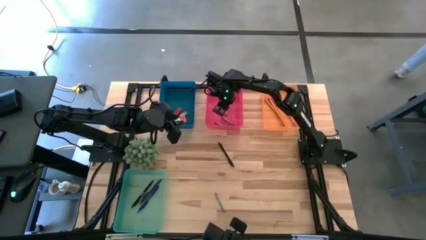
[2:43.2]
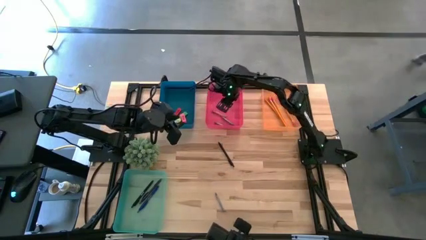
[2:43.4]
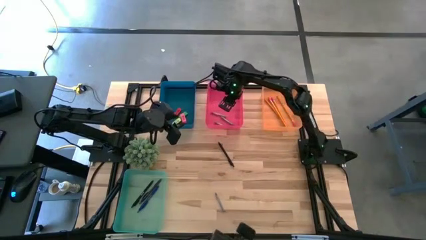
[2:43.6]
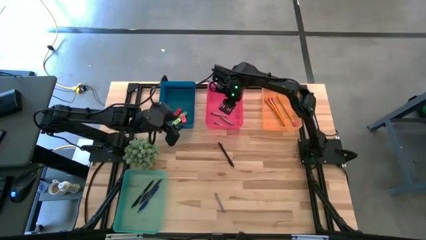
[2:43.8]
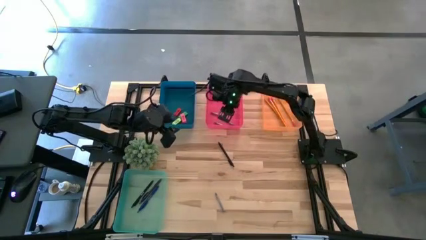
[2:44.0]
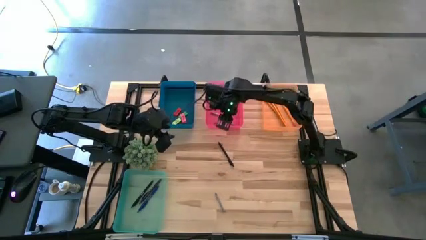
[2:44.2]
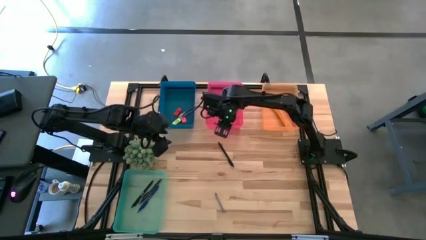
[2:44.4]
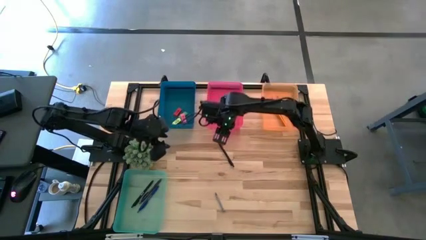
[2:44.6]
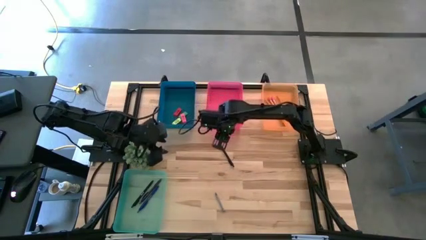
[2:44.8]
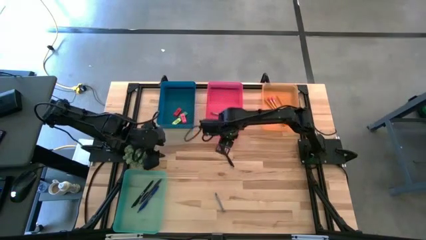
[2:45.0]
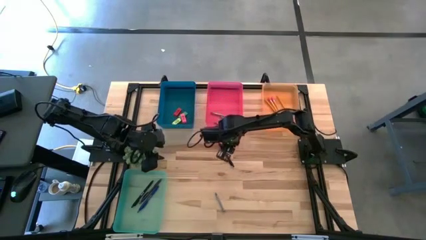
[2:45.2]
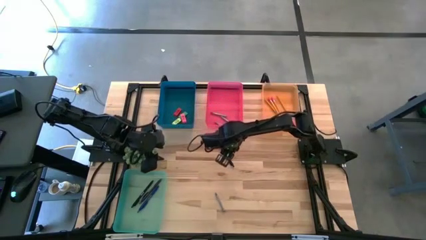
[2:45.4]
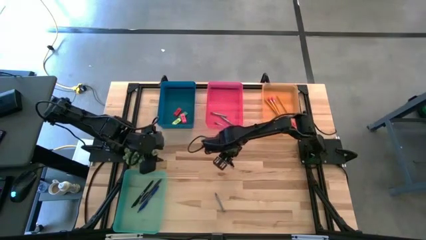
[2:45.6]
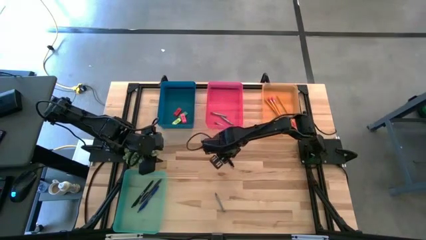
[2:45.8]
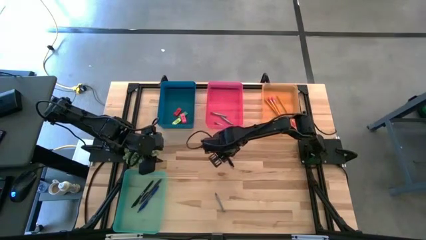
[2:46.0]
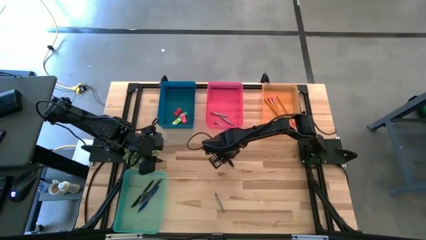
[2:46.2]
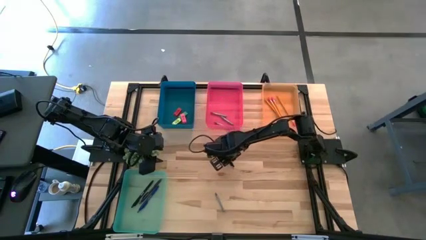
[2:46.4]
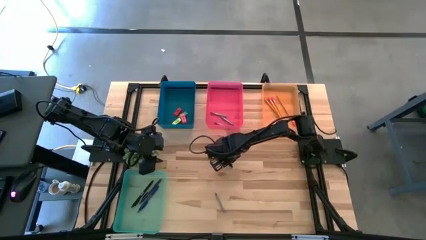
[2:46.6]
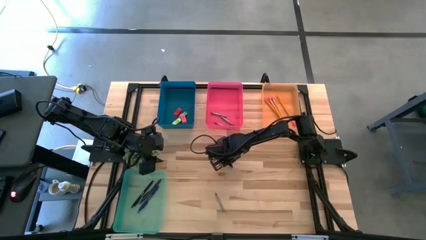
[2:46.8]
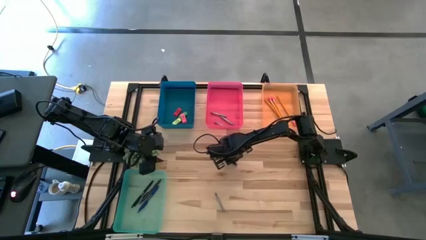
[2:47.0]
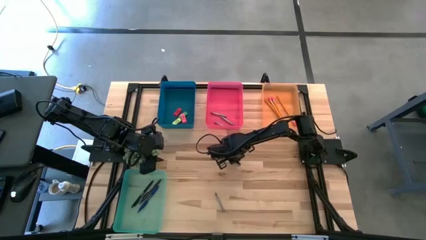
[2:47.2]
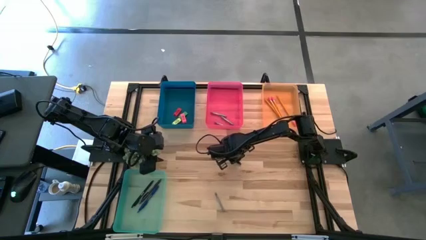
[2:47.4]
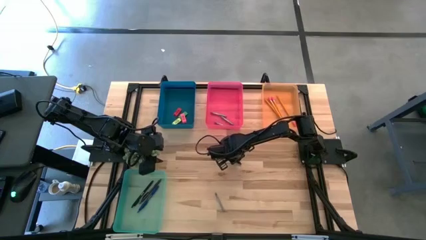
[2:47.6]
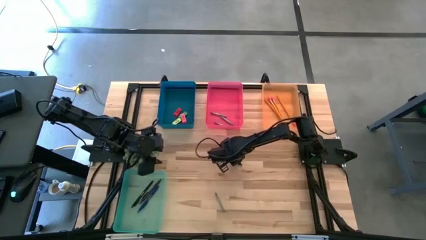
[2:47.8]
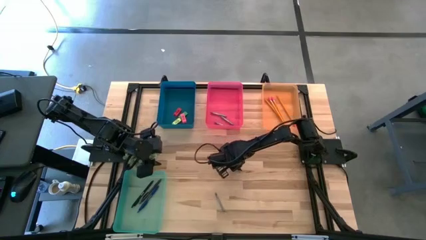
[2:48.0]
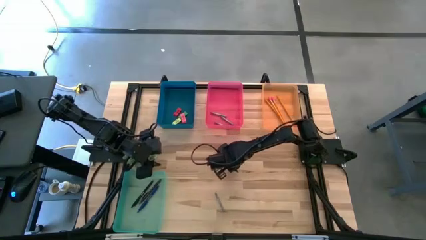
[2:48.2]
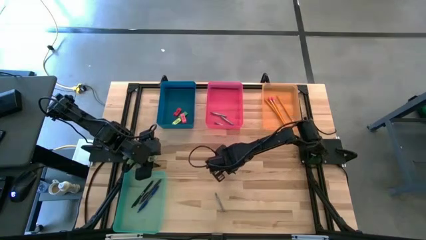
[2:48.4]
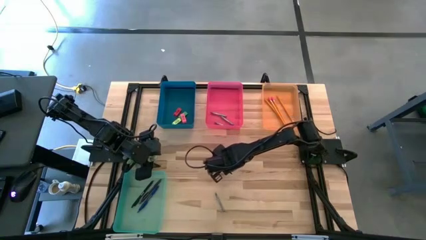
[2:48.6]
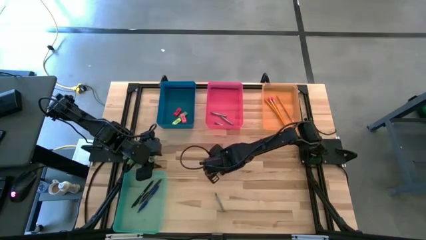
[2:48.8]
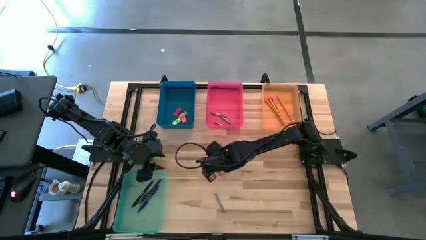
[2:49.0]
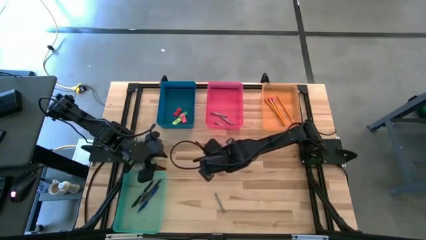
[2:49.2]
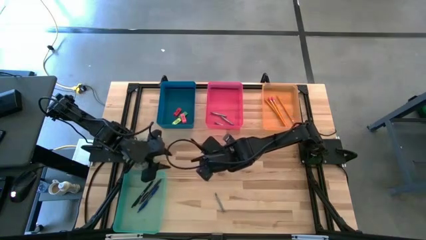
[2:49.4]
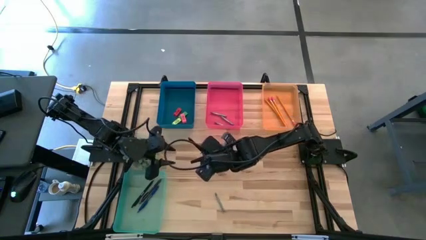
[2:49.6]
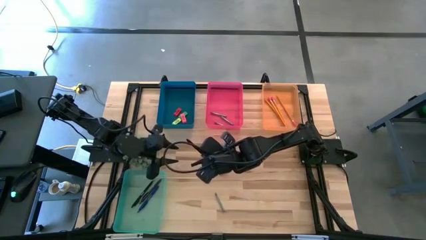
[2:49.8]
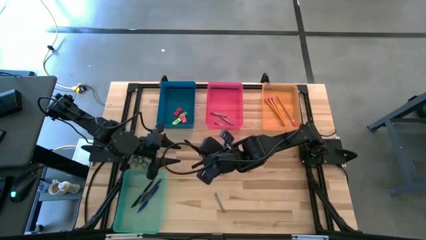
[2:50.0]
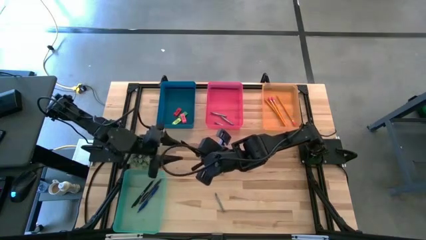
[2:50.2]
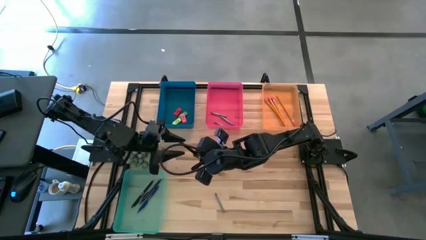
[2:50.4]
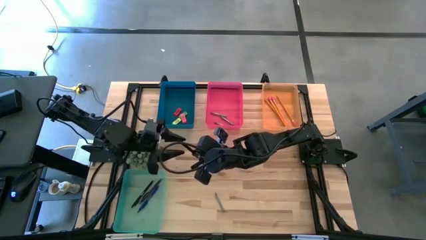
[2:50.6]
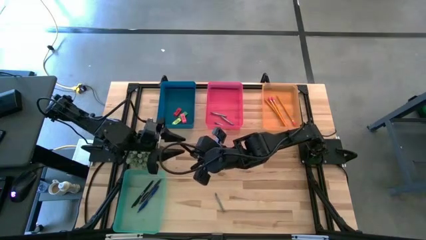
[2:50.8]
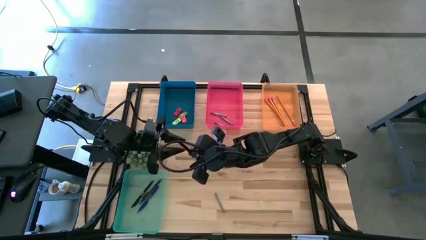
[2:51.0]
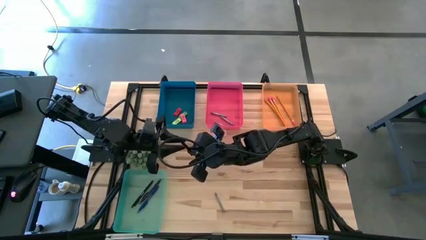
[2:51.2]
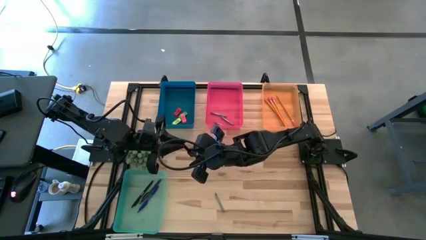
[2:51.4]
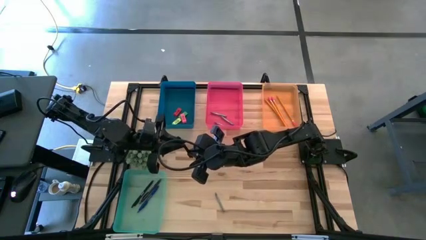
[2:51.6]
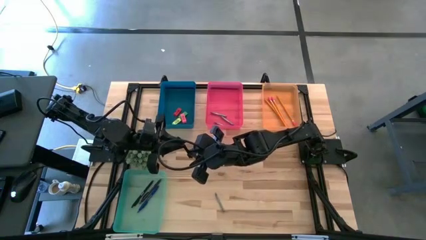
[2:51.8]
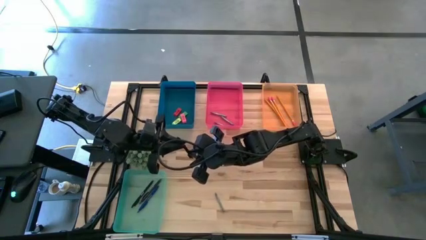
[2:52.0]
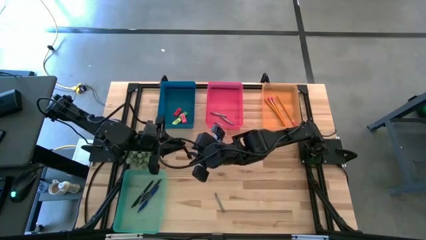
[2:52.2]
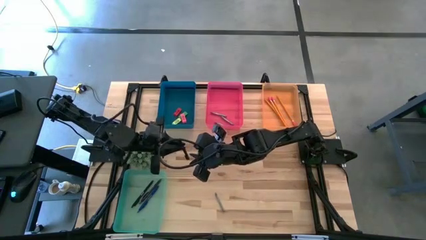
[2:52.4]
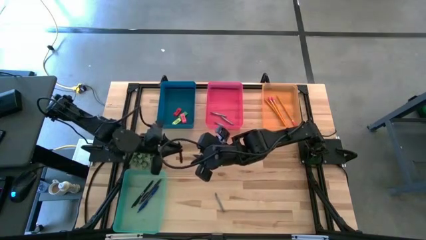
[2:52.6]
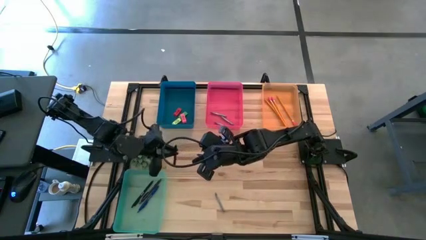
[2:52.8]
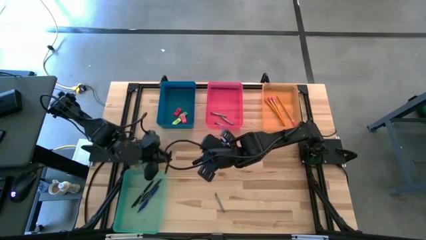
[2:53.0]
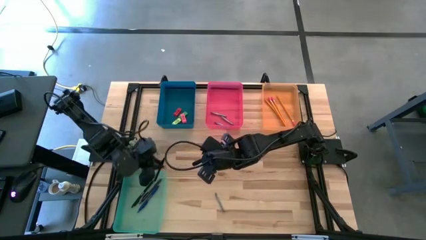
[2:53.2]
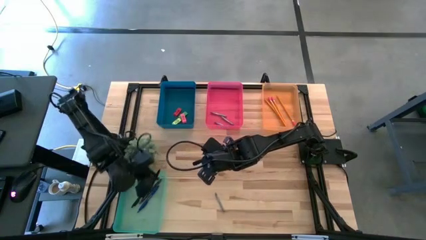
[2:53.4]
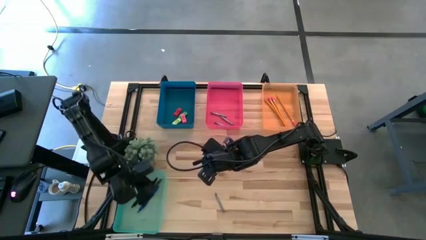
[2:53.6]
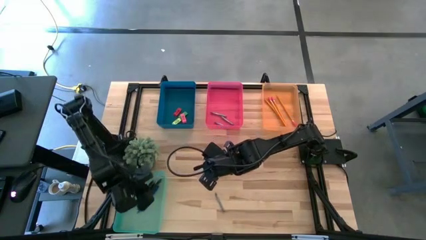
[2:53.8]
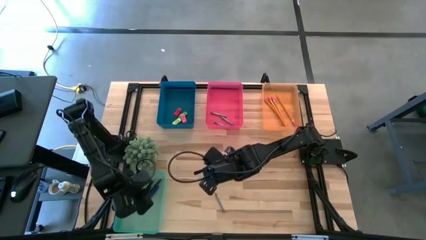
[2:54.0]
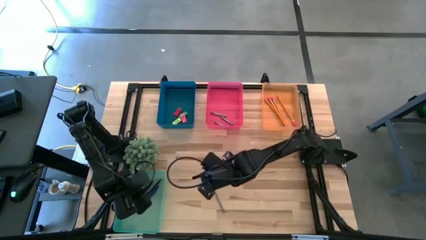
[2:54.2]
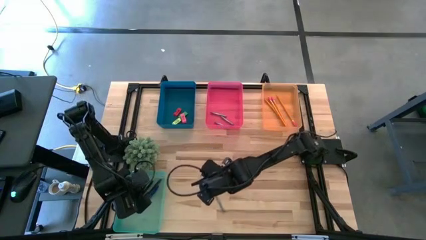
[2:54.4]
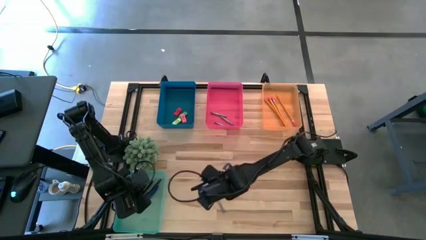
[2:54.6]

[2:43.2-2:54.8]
Task: Sort crayons/erasers/pens/pencils in bins
Put the black pen into the transparent blue bin

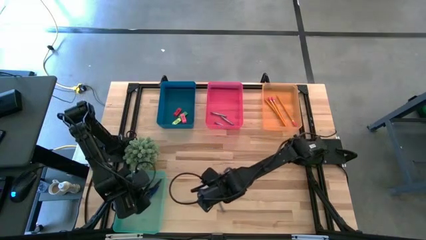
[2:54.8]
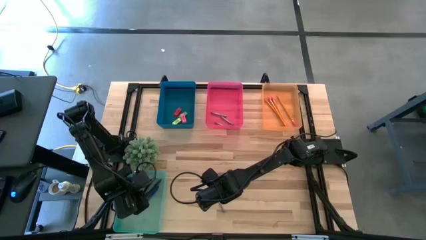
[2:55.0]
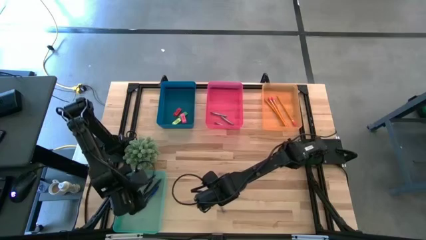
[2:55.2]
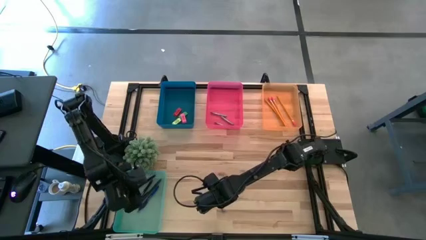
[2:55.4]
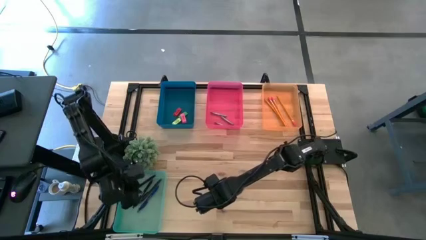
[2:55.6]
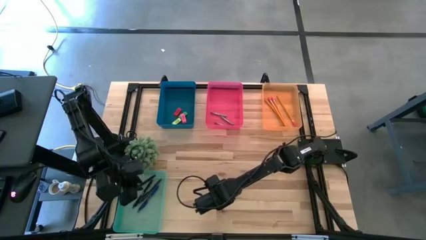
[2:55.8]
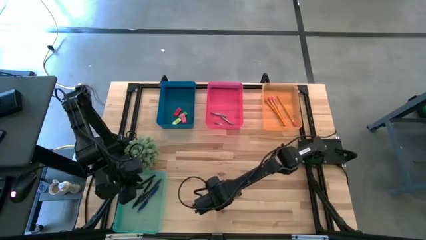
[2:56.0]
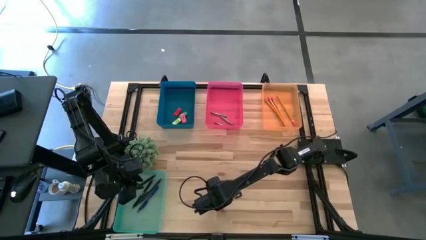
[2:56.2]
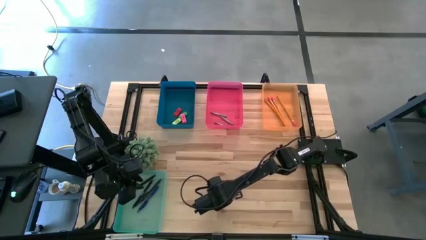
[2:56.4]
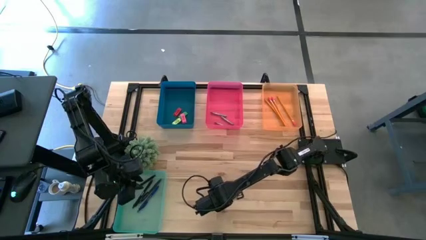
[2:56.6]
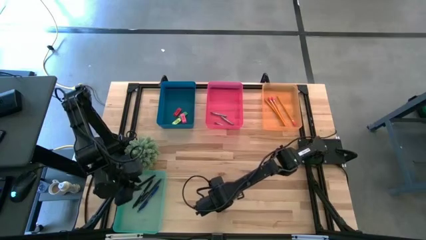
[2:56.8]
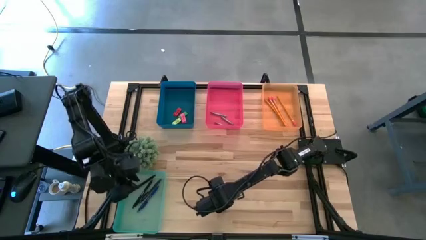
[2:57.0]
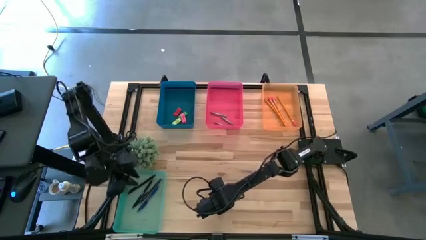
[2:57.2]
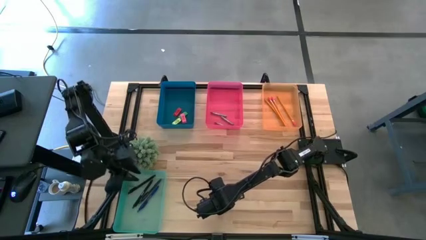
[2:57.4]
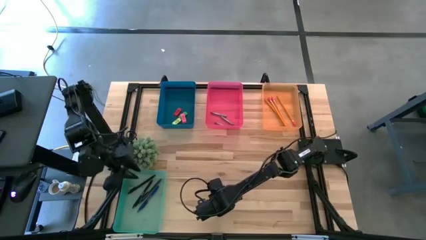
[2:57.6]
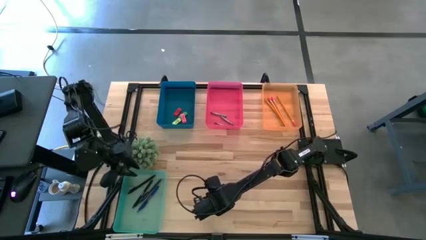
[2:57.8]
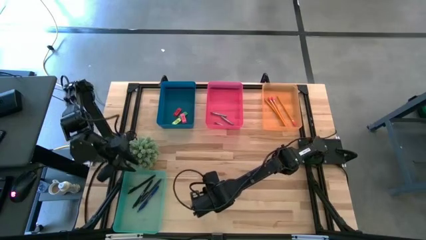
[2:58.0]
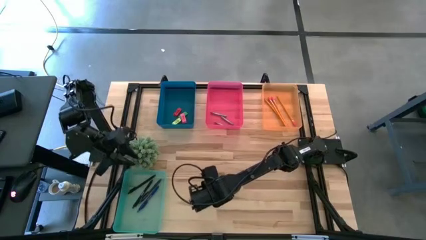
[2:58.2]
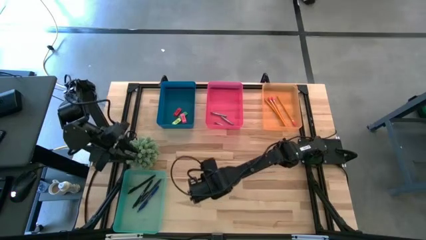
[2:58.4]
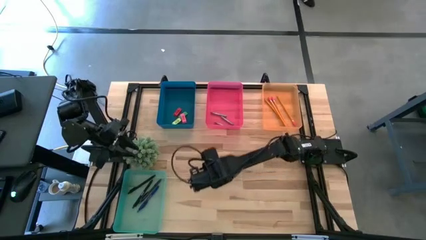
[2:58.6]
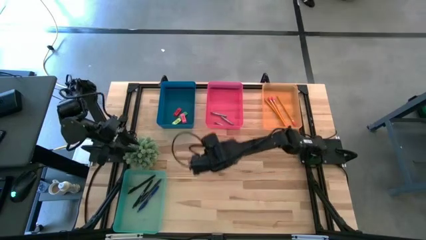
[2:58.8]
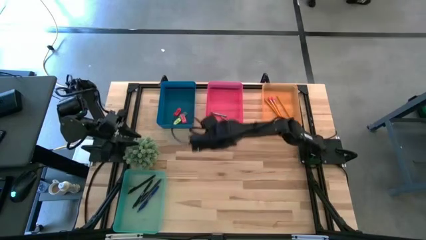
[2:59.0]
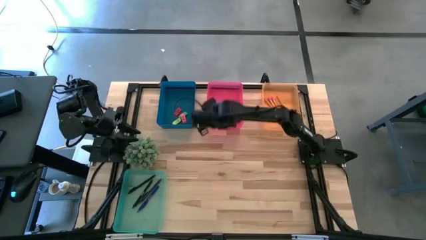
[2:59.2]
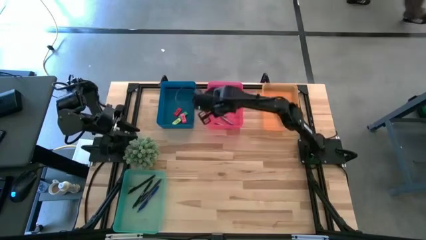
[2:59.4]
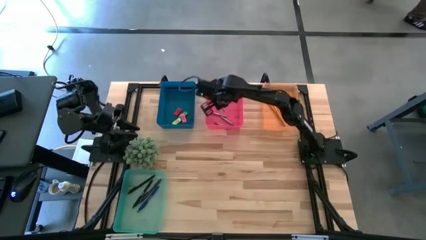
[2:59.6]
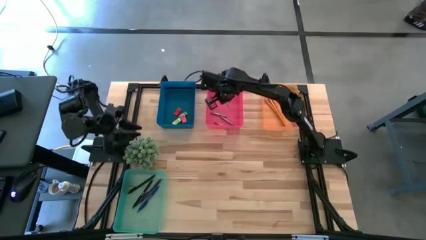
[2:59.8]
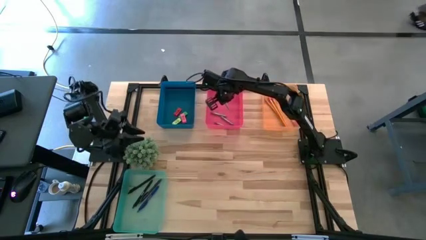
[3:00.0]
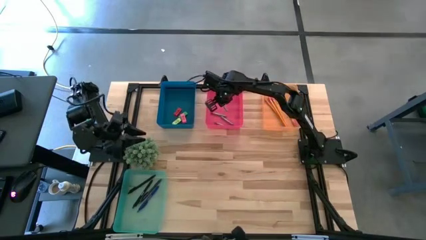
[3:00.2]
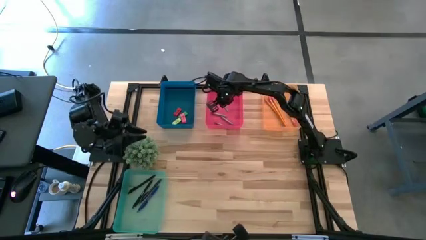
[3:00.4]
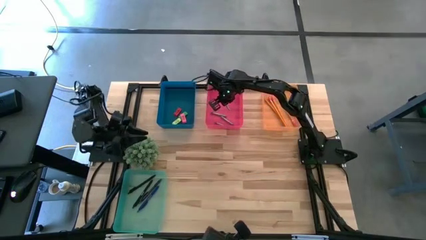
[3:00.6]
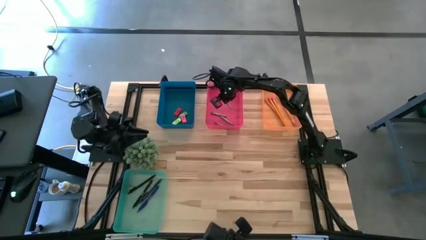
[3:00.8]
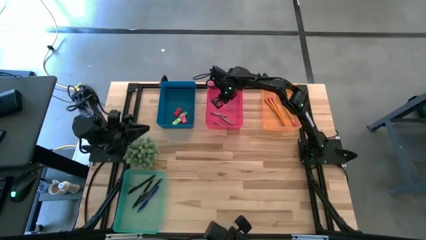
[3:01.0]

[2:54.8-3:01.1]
Put the gray crayon into the transparent red bin
